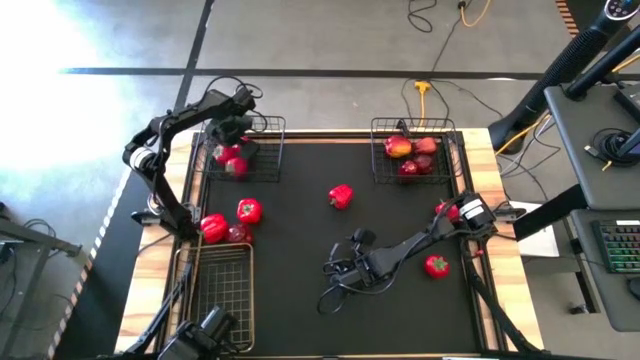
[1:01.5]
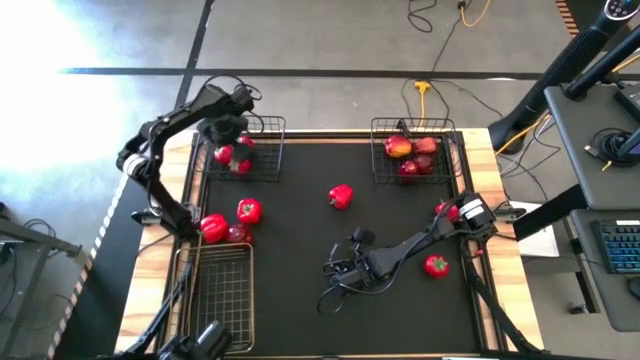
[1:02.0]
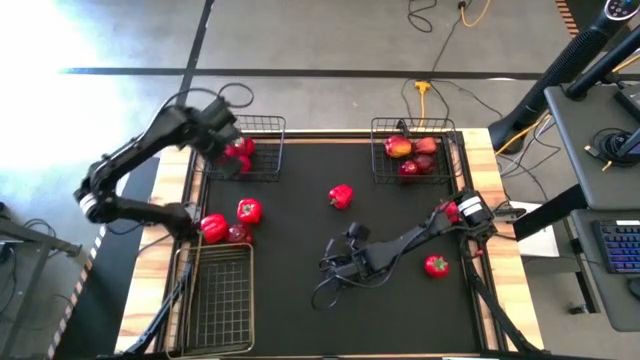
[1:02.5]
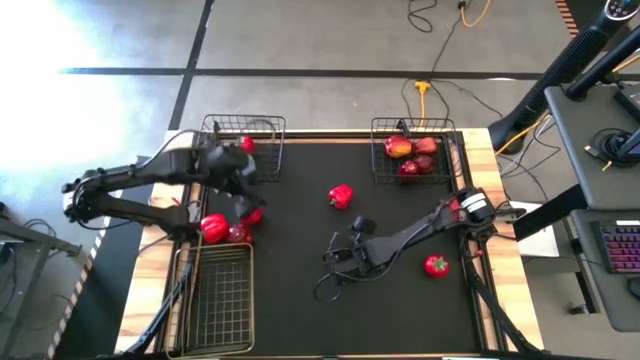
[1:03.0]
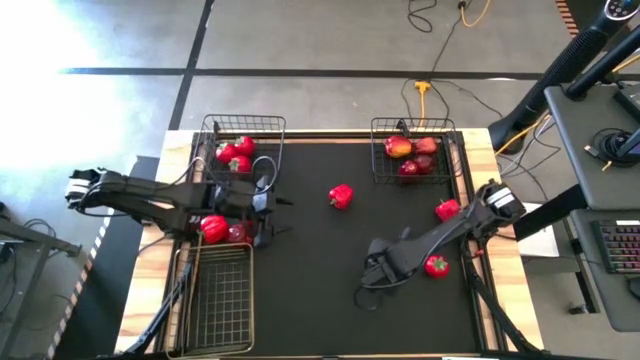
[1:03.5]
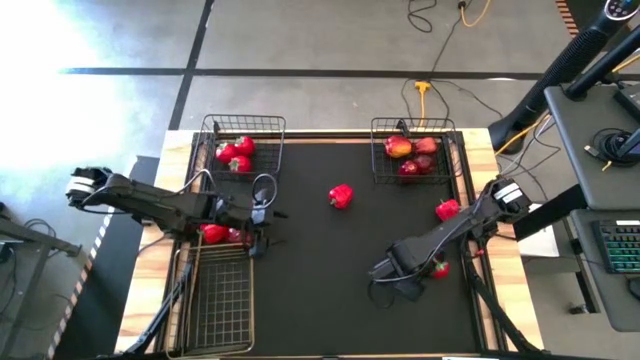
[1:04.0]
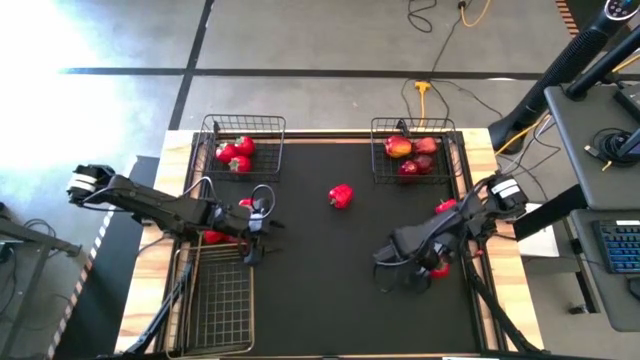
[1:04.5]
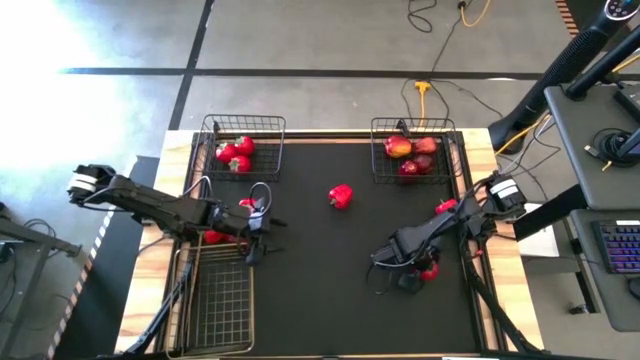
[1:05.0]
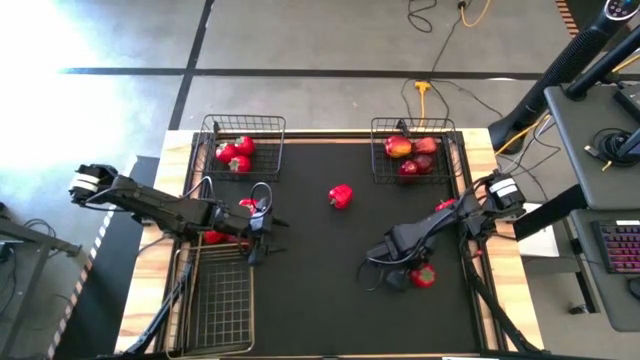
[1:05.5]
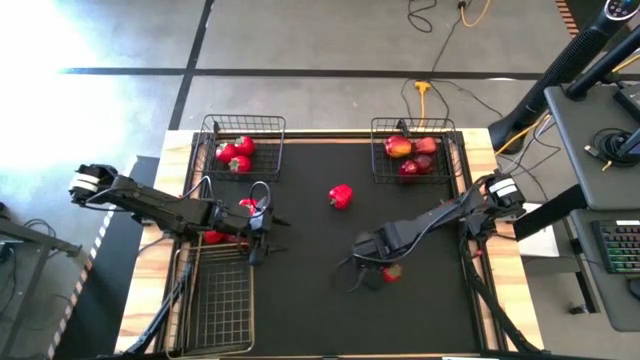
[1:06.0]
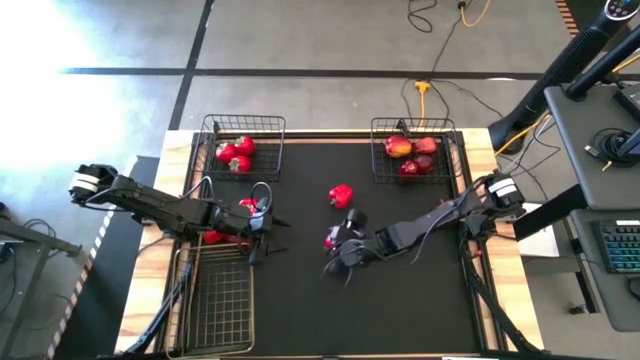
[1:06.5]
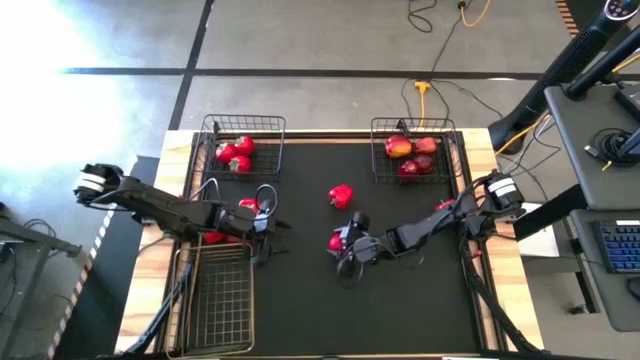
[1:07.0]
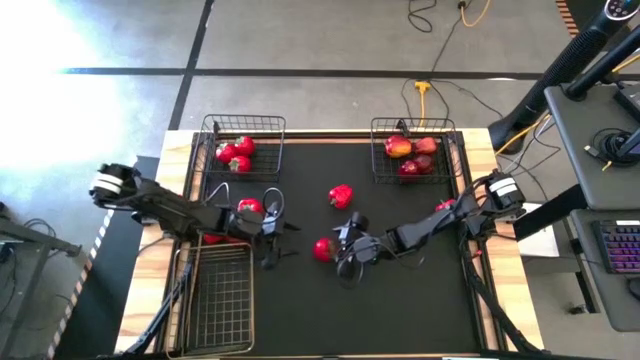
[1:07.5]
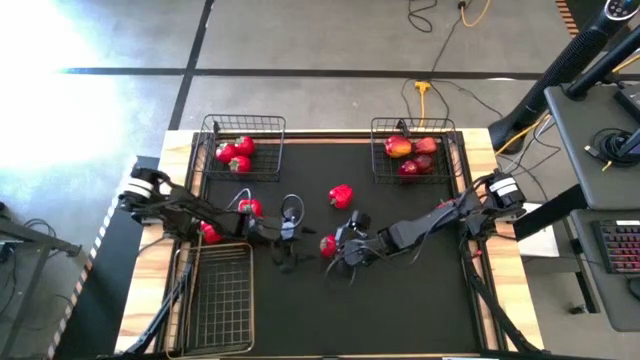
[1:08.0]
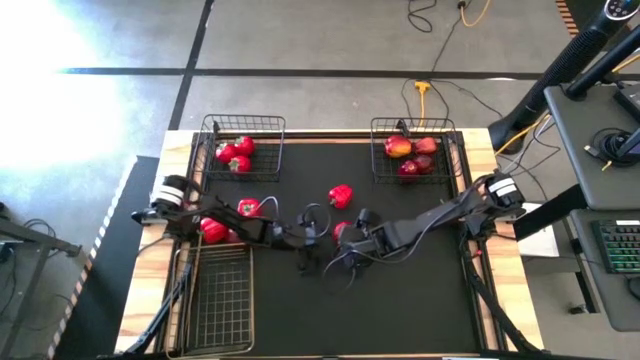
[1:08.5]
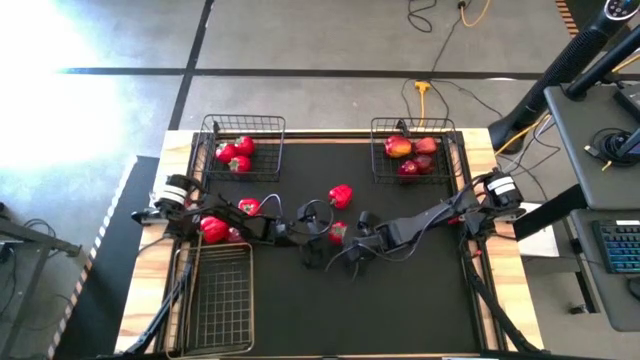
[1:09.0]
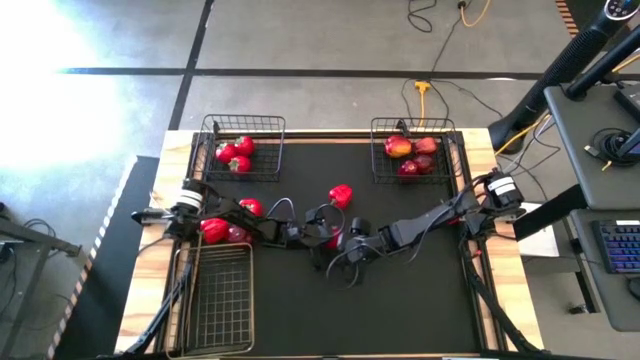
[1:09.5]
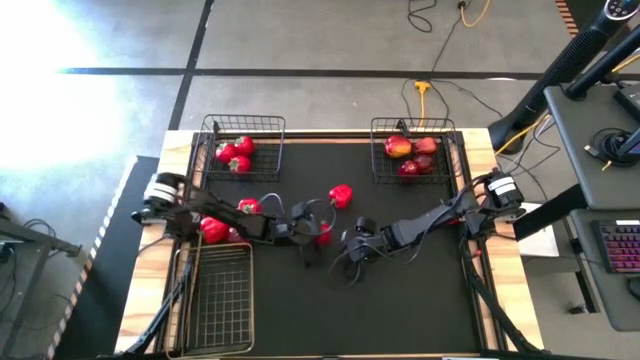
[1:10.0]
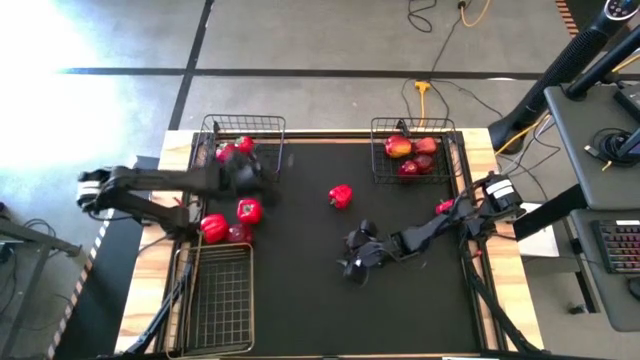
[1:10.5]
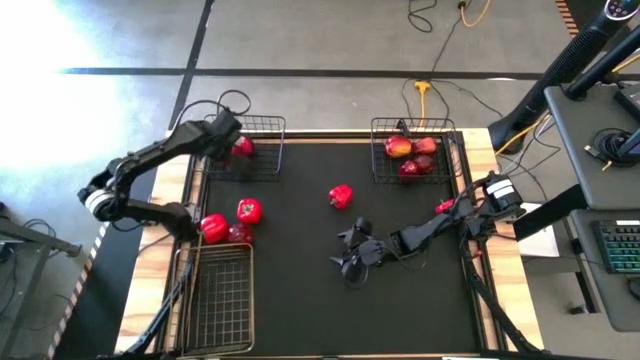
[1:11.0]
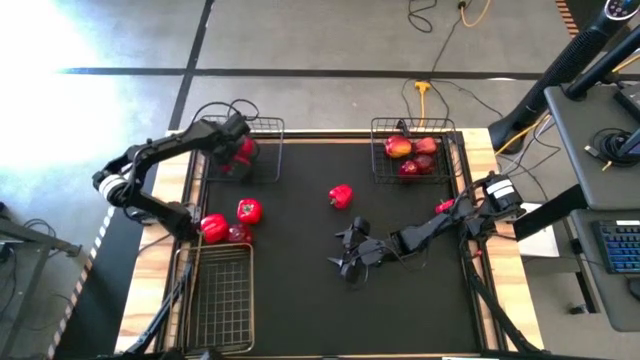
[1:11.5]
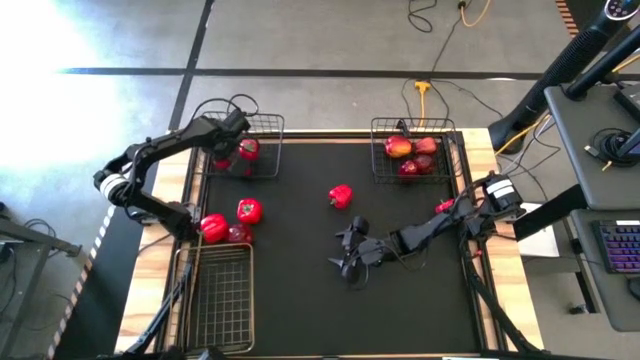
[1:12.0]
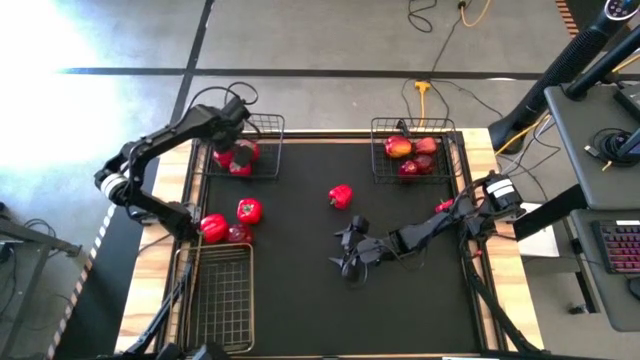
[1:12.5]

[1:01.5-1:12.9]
Task: Sort produce into baskets
Put the tomato into the left black wire basket

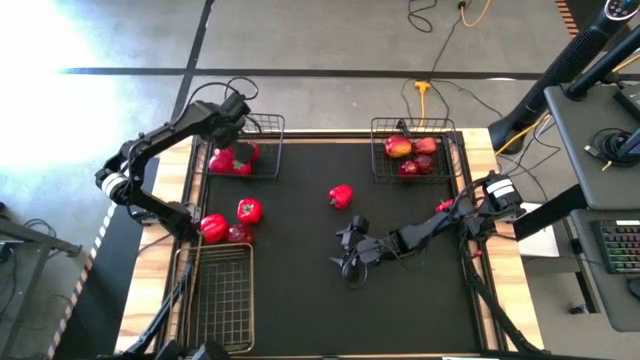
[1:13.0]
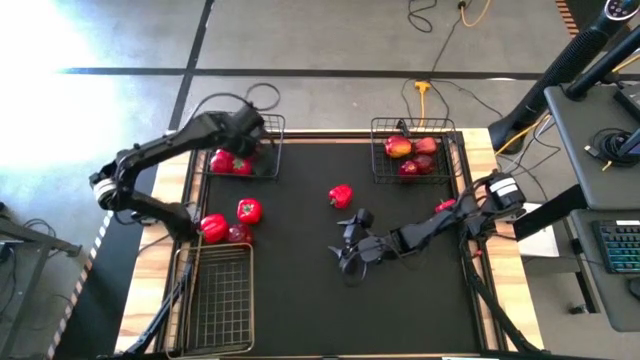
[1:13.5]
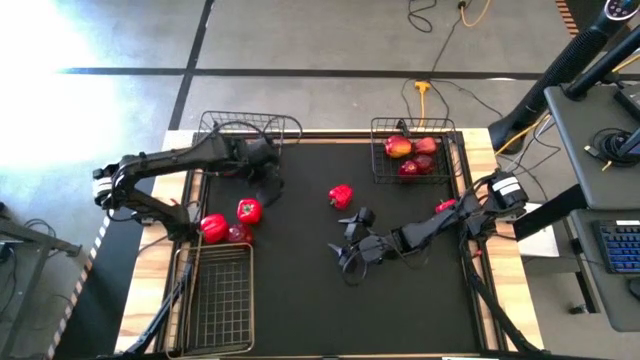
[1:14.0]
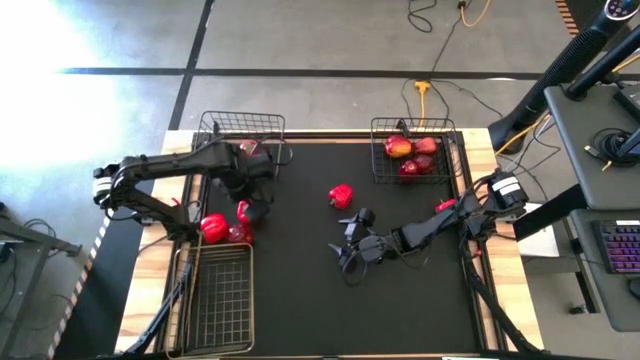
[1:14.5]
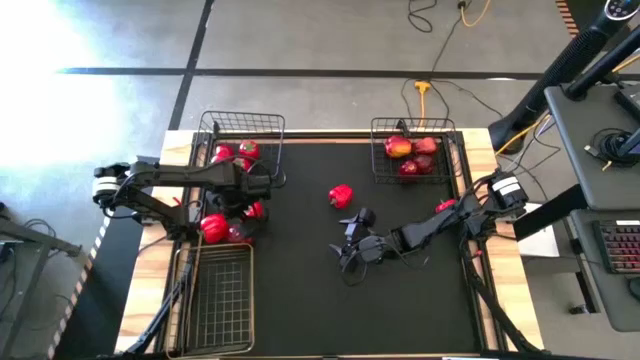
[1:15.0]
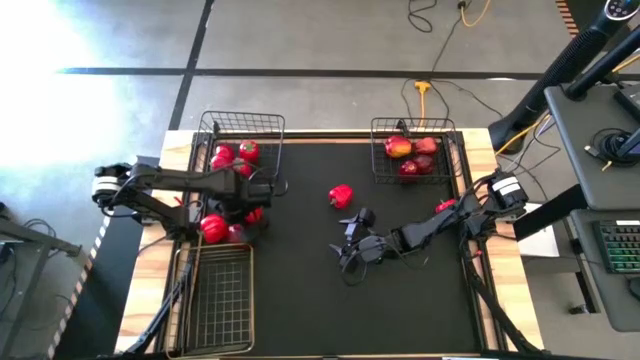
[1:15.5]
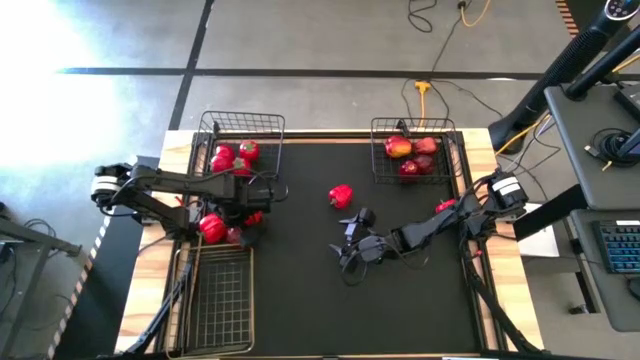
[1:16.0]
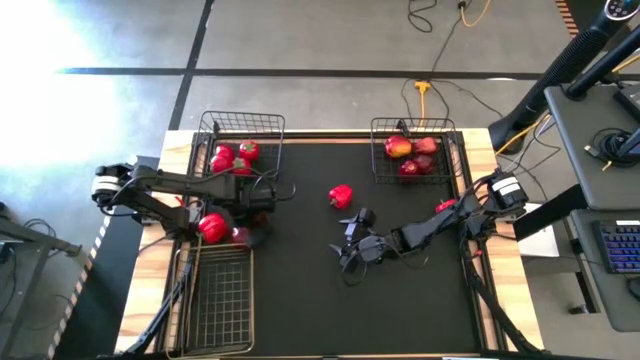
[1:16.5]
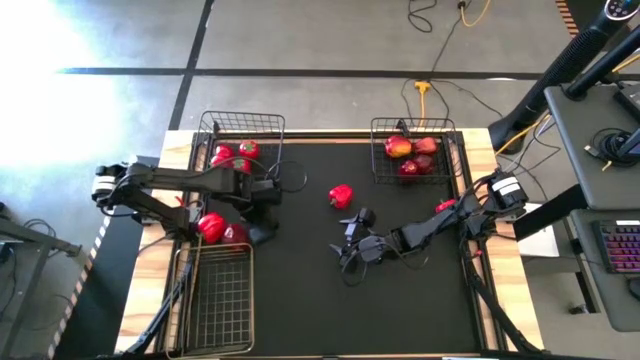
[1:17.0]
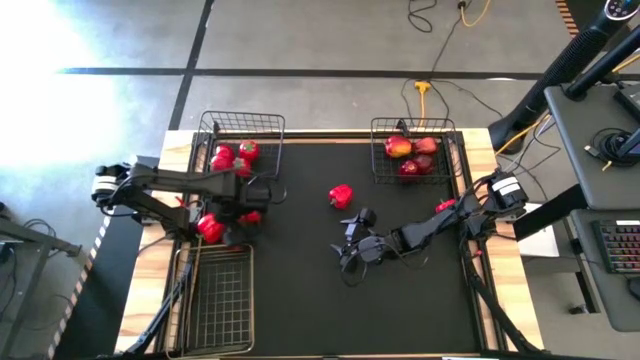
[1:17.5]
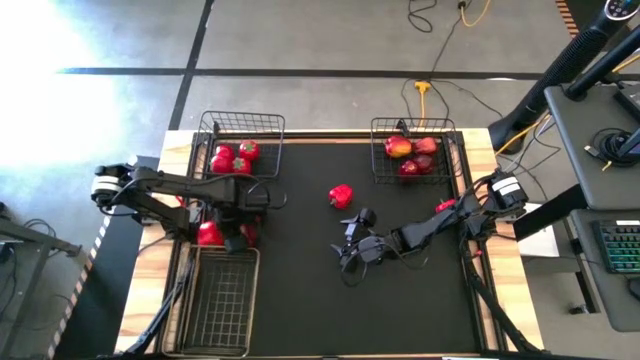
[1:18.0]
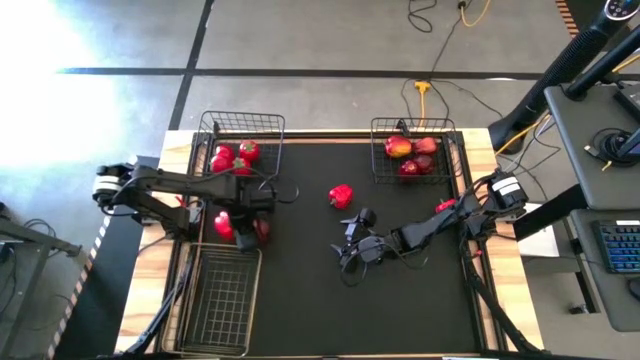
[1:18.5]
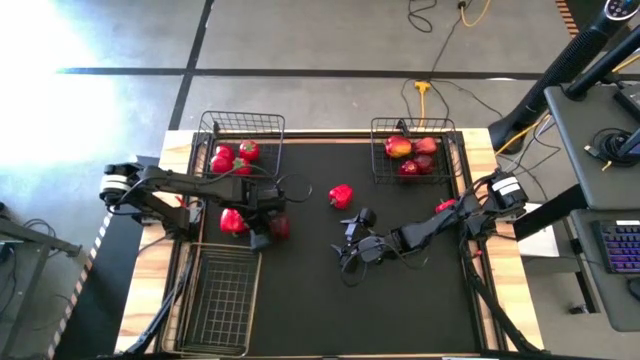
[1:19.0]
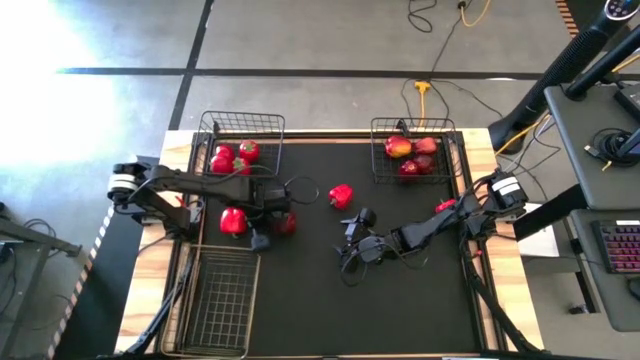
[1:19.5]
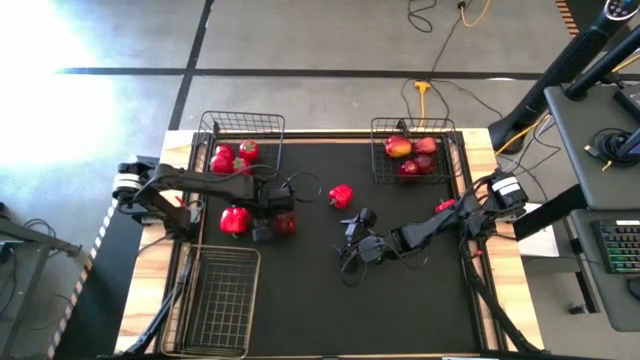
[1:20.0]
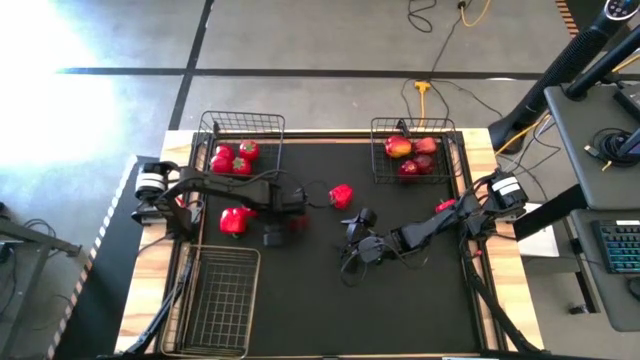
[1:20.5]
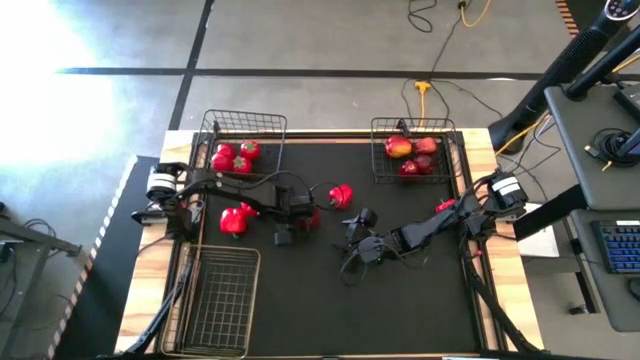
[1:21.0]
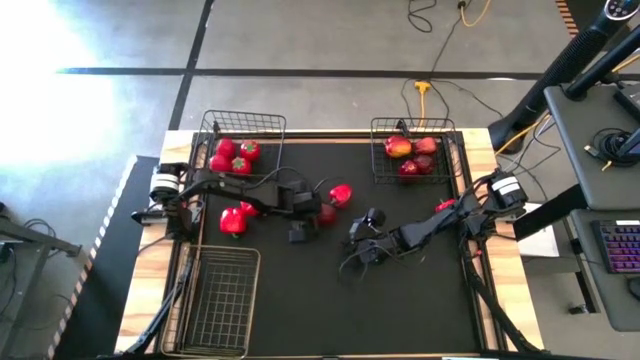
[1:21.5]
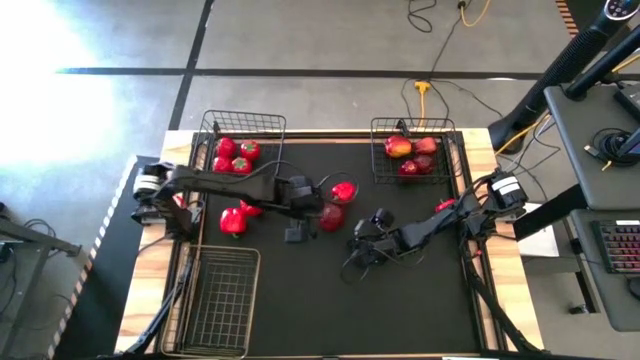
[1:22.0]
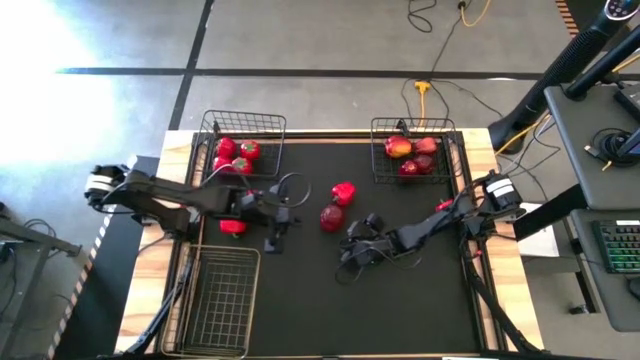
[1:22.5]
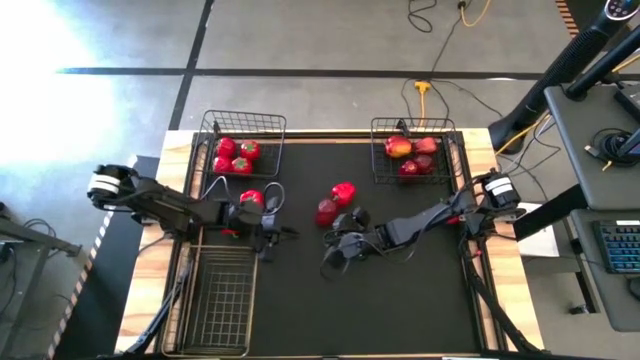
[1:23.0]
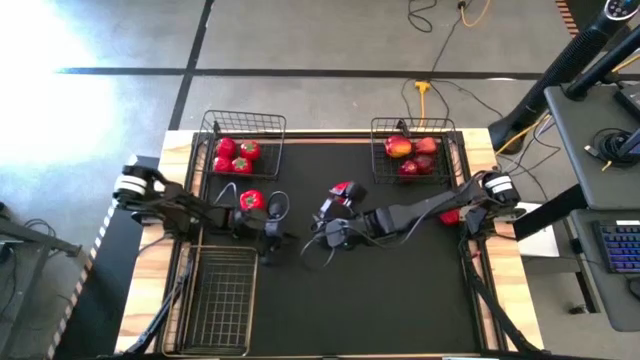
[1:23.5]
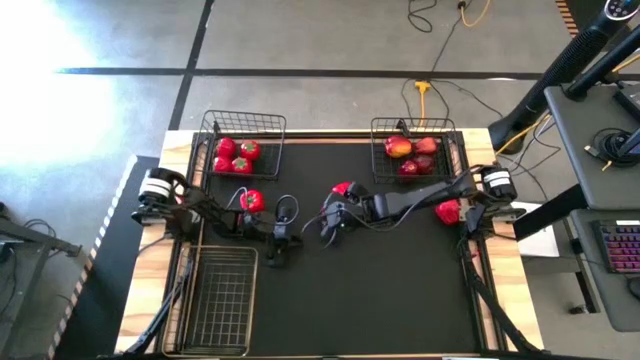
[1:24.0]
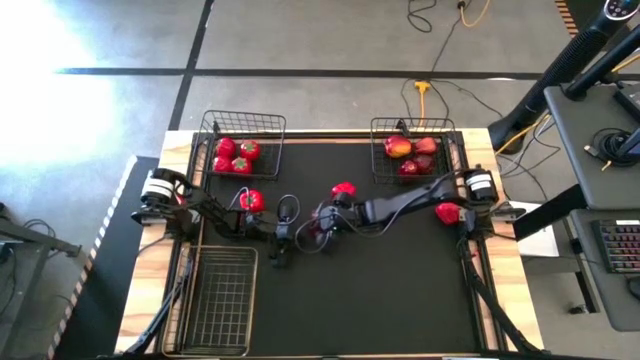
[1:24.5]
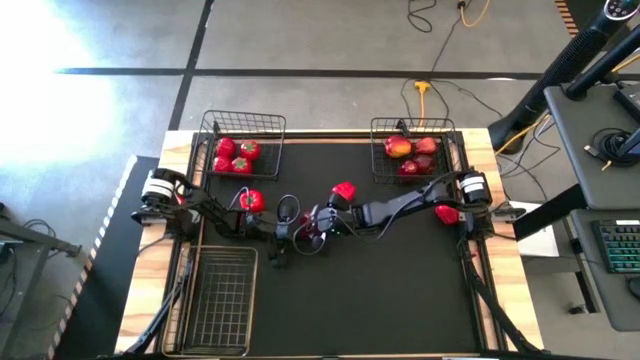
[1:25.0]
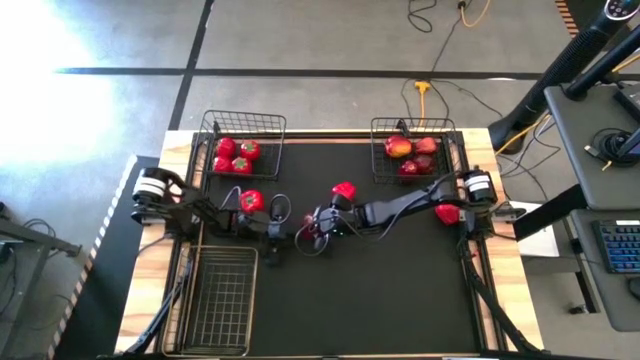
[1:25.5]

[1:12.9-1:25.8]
Put the apple into the right black wire basket
